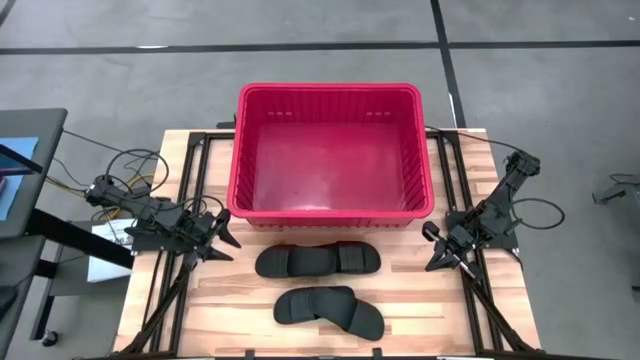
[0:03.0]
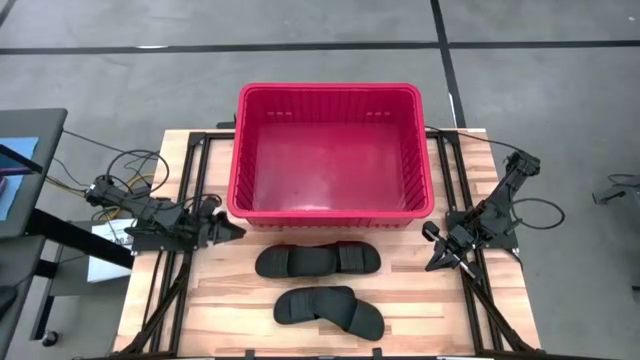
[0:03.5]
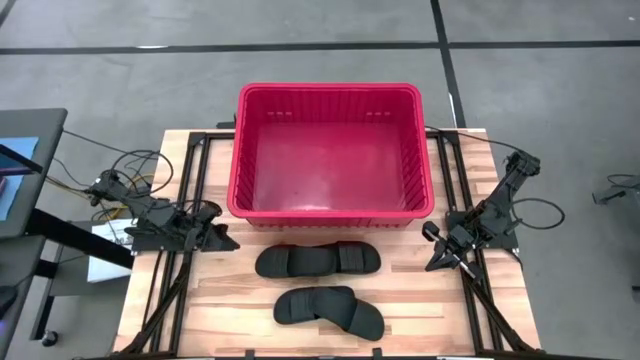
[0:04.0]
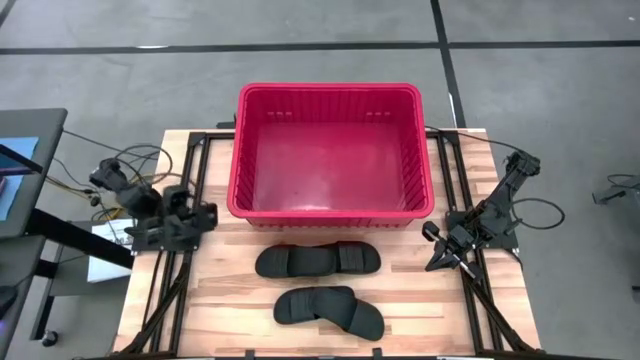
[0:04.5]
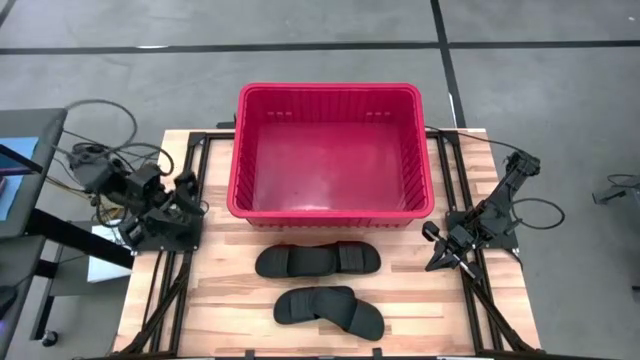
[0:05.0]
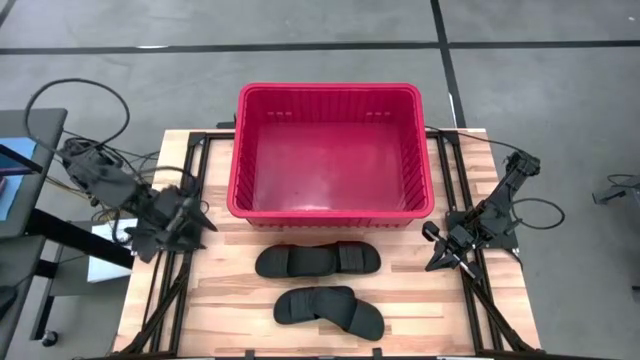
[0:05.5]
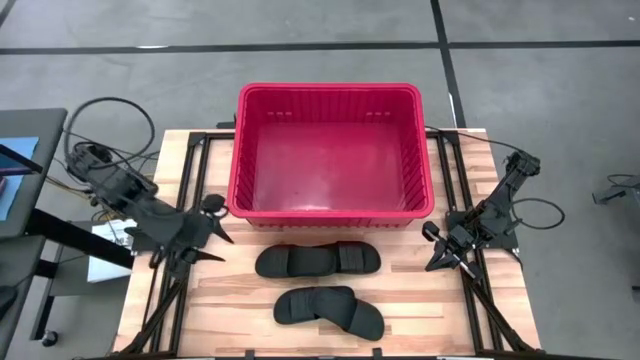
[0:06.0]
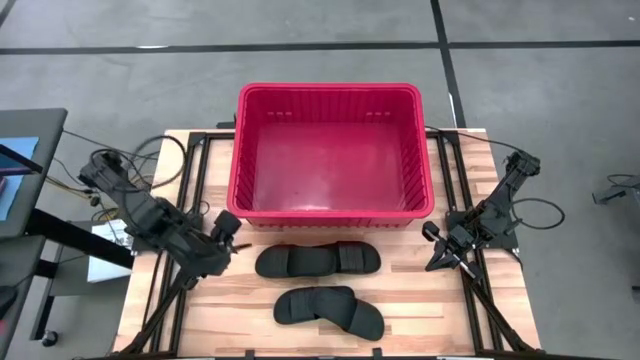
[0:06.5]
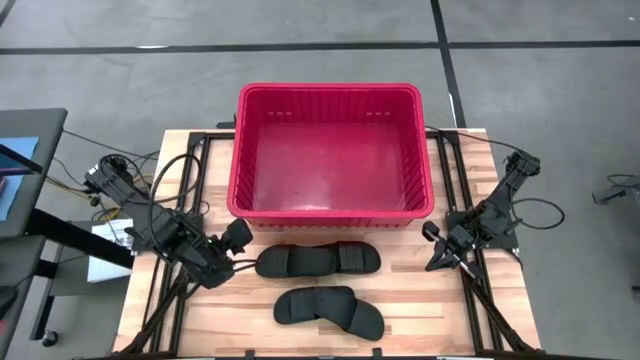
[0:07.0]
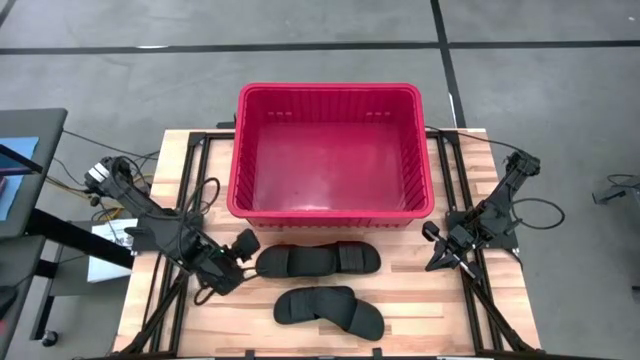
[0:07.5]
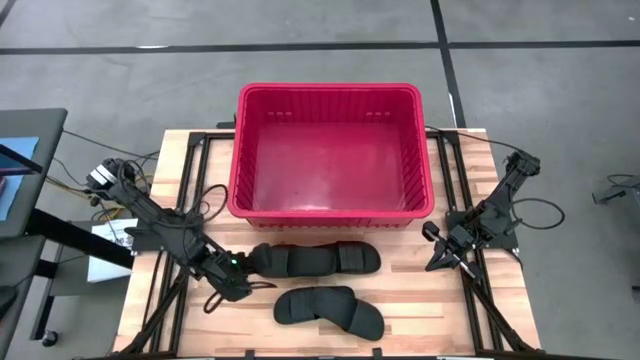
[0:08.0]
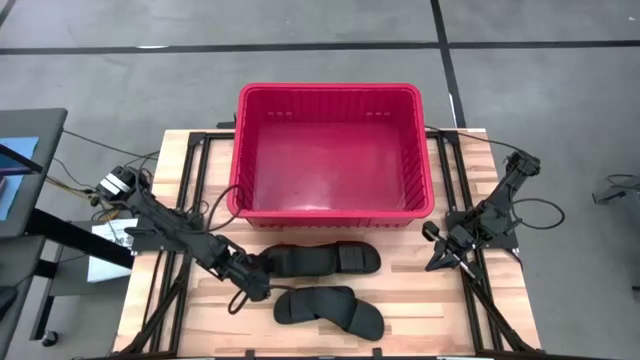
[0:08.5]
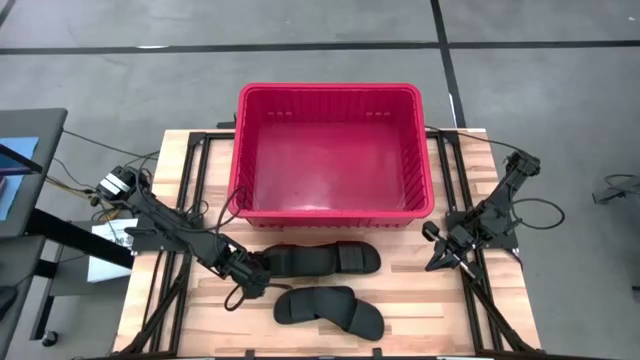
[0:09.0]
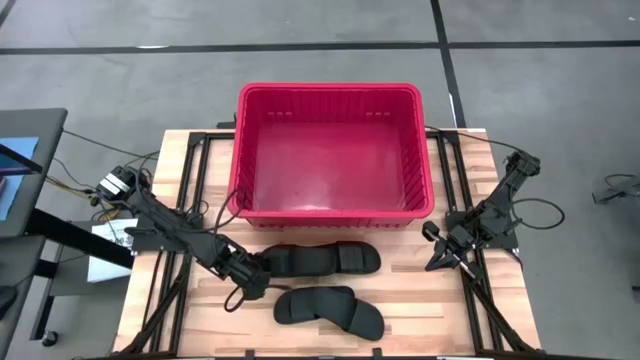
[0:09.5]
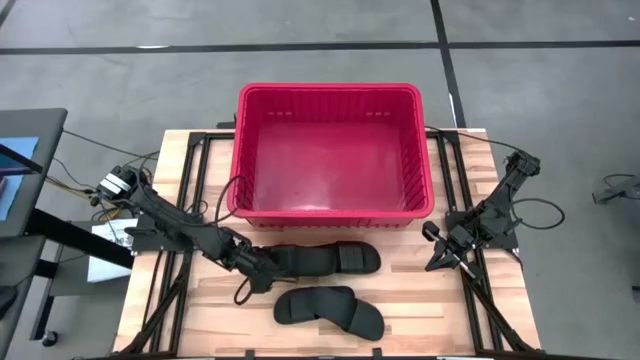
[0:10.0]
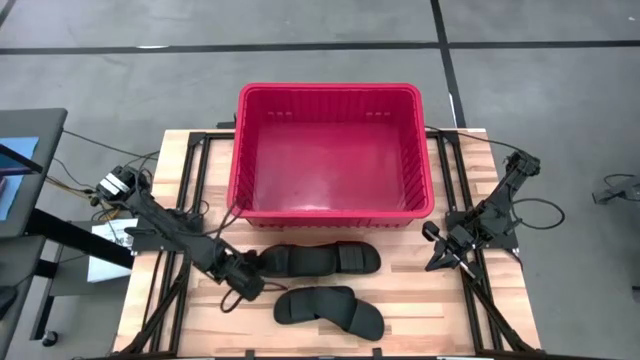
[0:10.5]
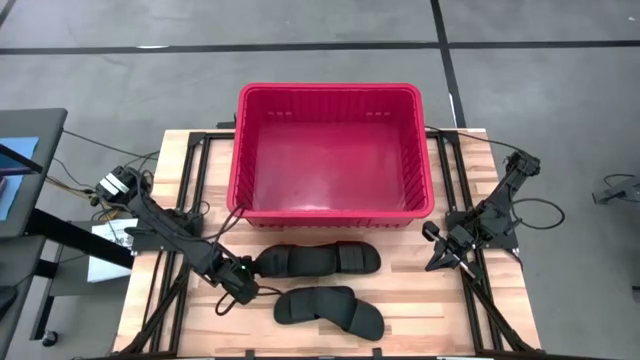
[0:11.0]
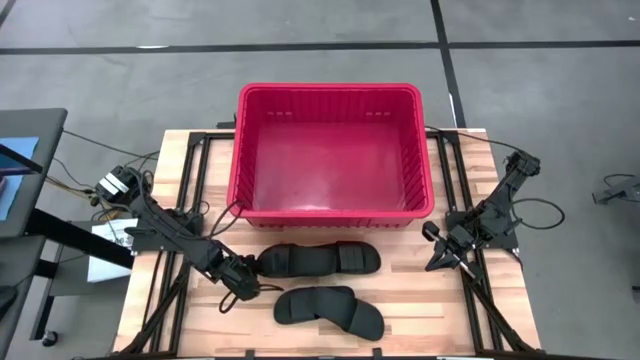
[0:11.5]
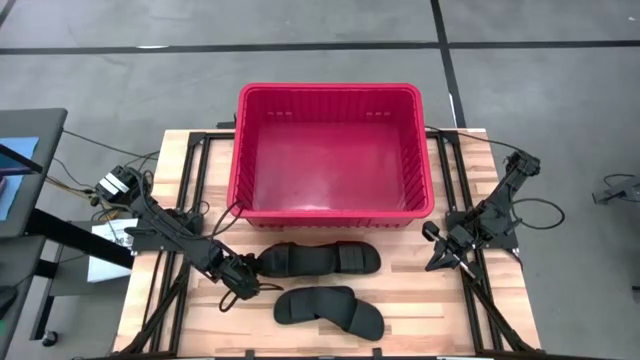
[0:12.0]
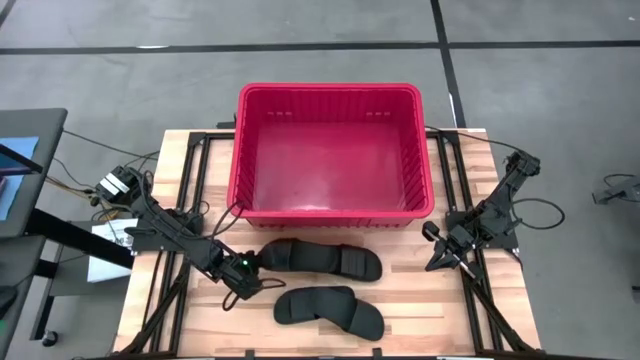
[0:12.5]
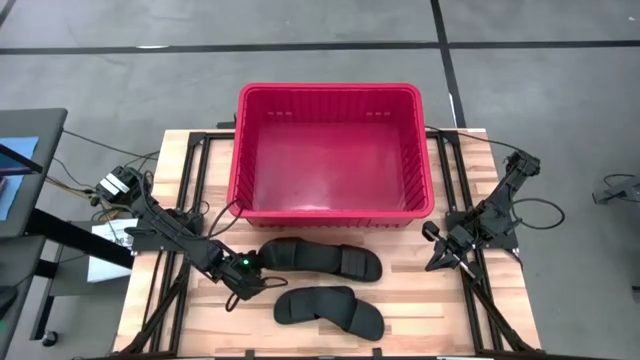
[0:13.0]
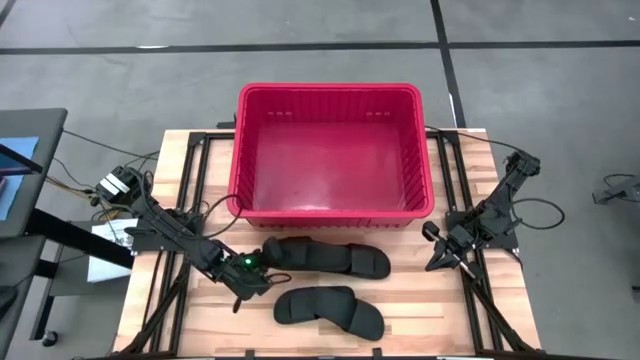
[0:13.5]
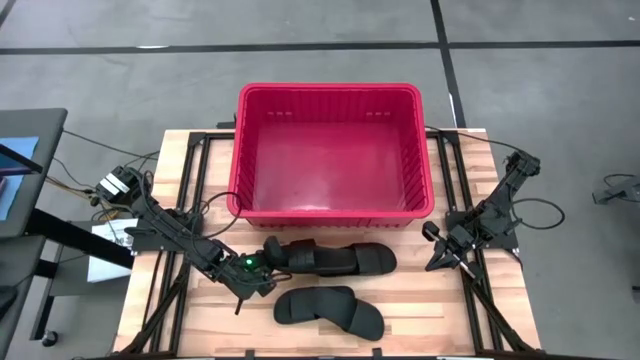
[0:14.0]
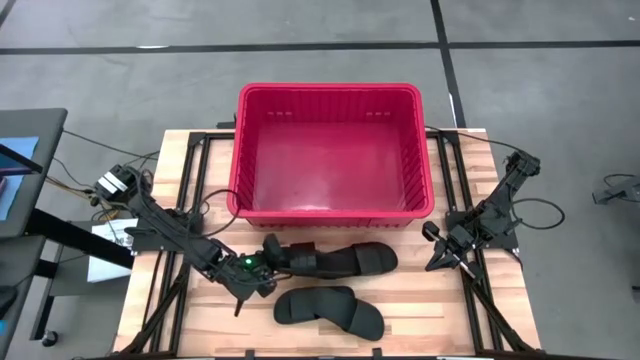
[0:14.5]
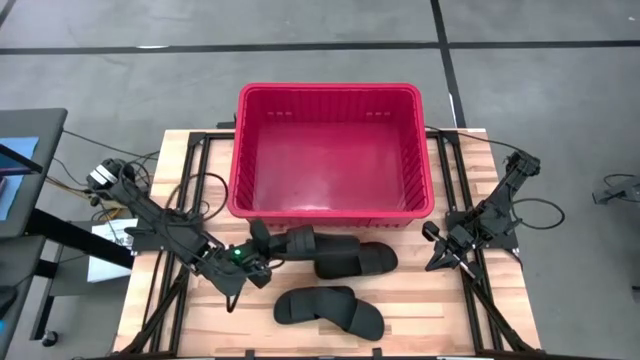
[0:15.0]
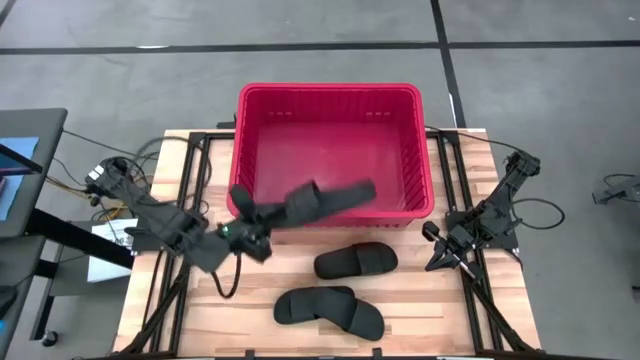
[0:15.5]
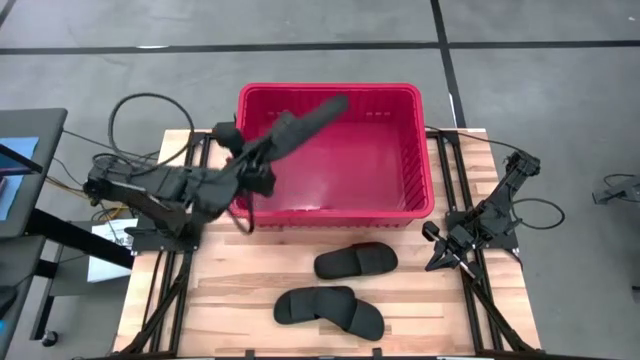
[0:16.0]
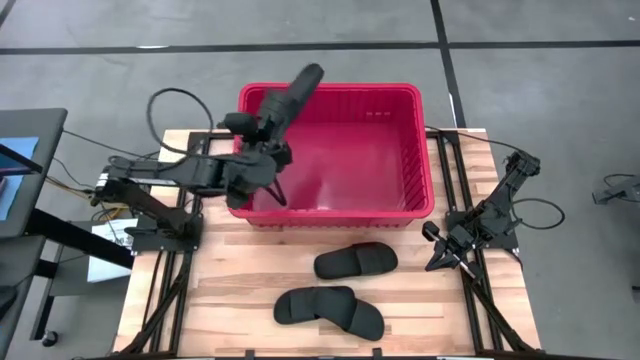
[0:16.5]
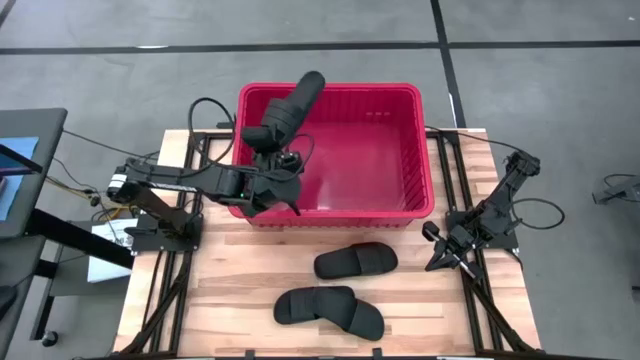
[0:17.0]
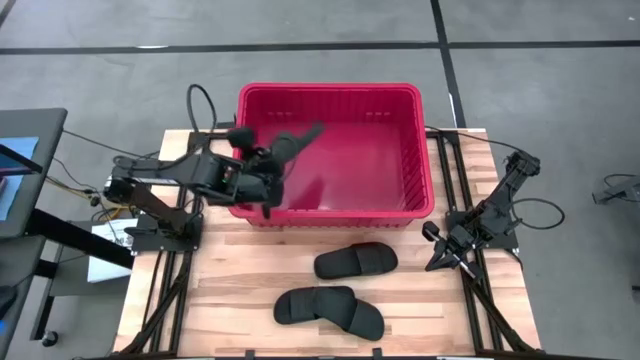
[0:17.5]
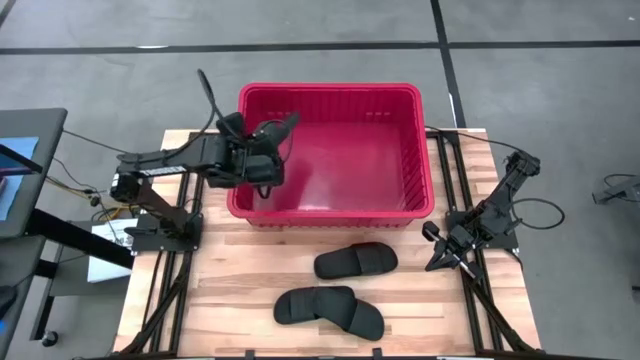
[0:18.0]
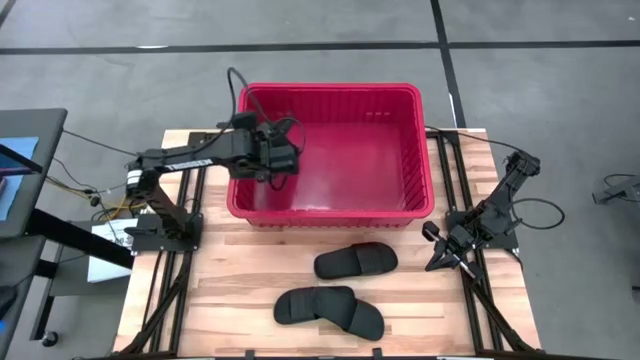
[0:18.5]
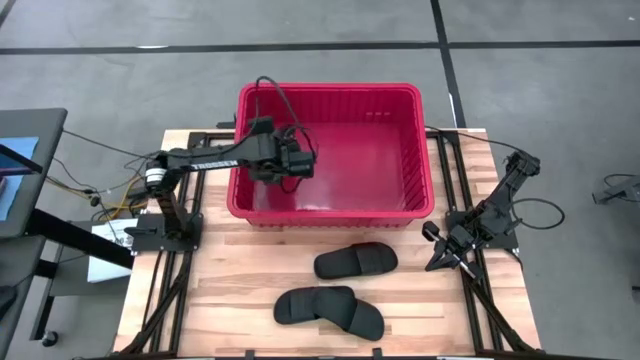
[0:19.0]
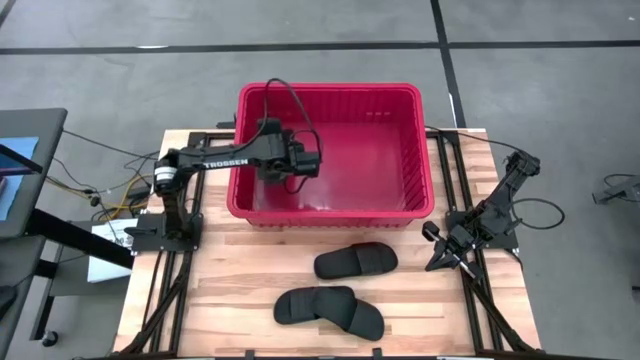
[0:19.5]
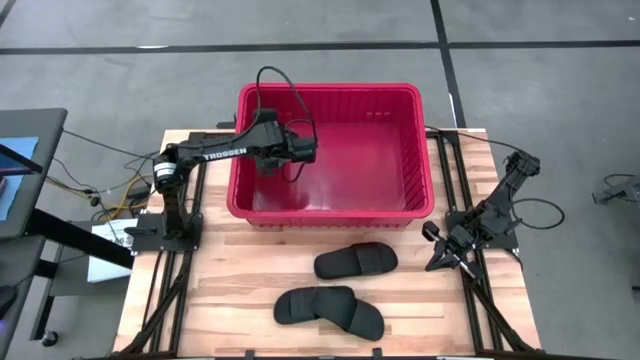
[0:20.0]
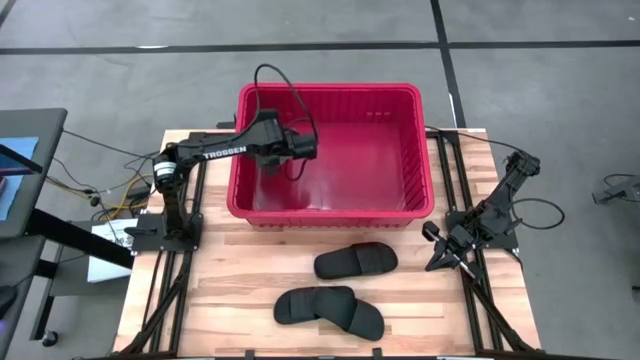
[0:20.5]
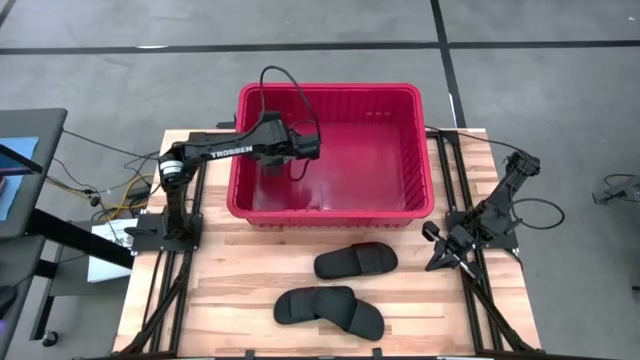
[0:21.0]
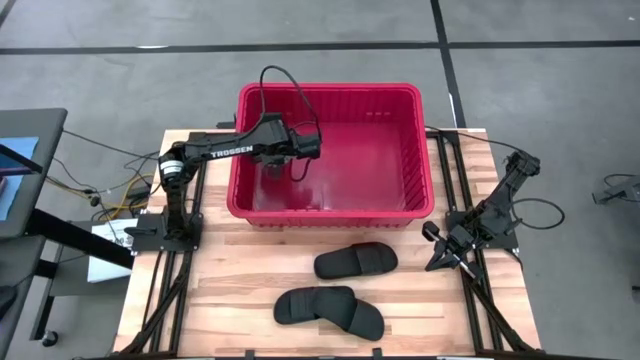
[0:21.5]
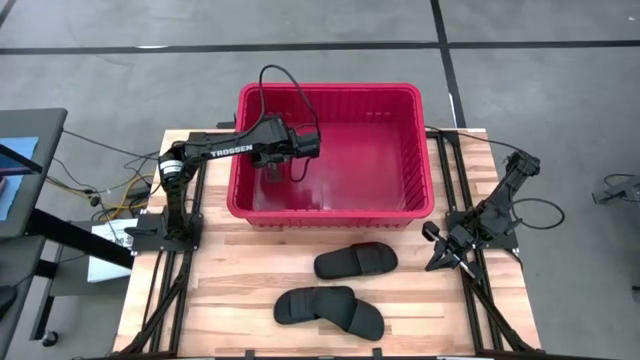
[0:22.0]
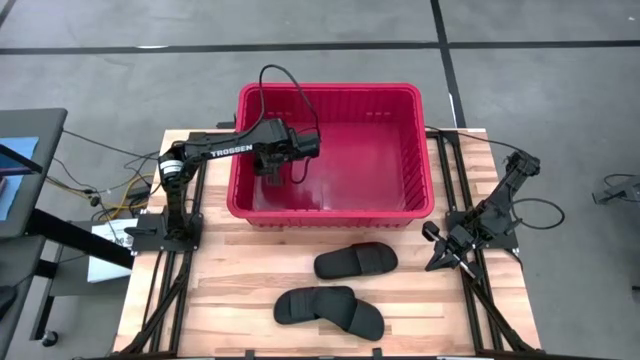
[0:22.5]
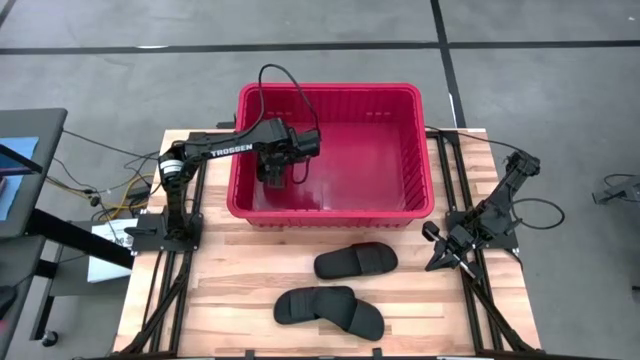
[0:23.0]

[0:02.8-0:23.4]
Task: Pick and place slides into bin
Put the slide into the organizer bin
